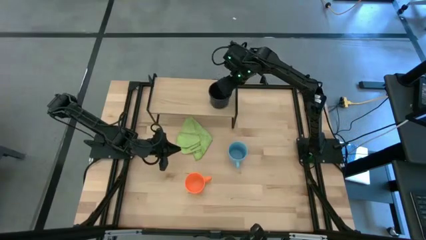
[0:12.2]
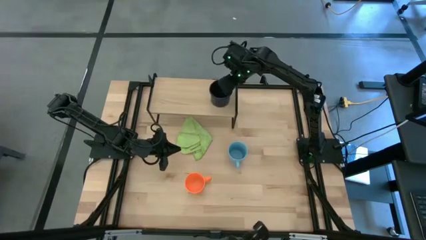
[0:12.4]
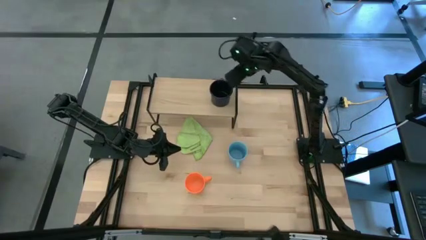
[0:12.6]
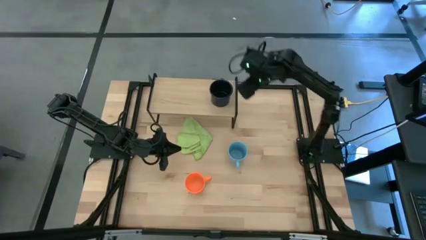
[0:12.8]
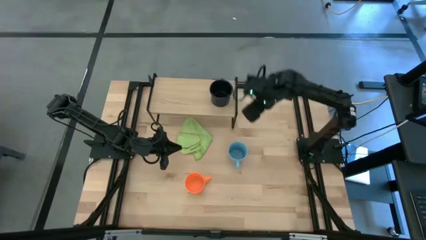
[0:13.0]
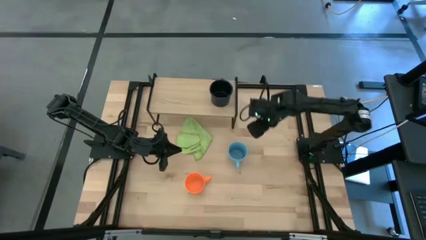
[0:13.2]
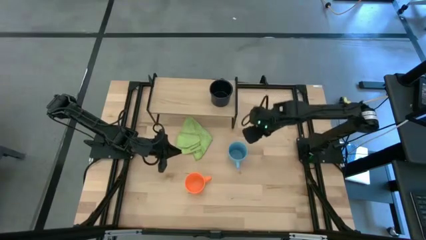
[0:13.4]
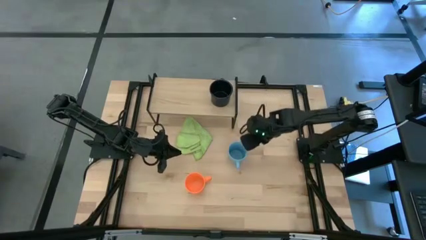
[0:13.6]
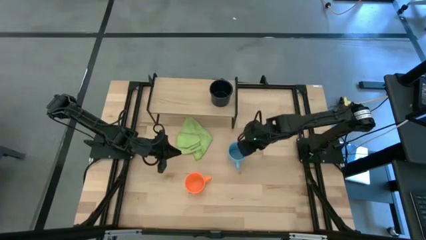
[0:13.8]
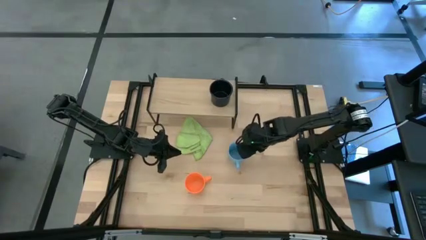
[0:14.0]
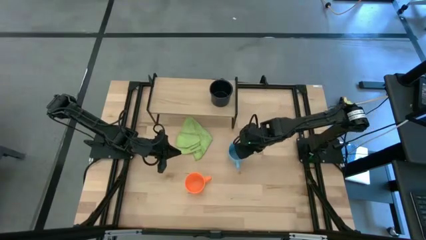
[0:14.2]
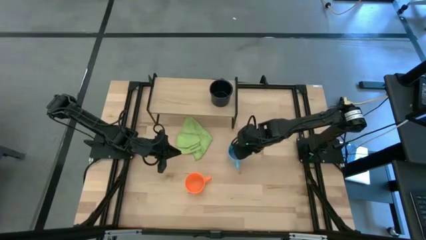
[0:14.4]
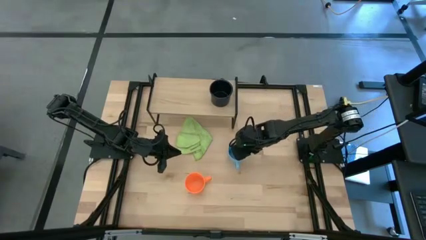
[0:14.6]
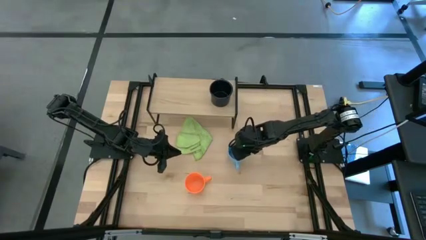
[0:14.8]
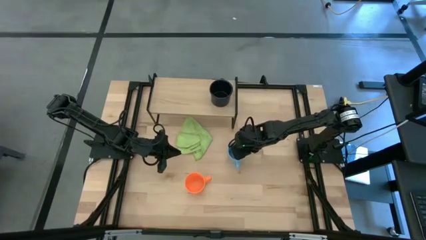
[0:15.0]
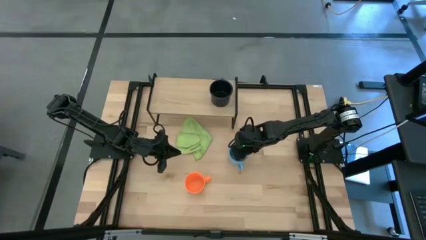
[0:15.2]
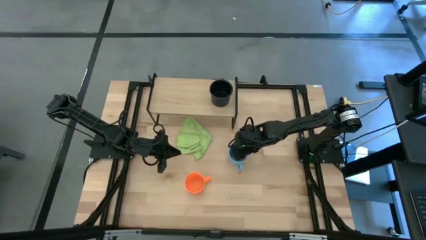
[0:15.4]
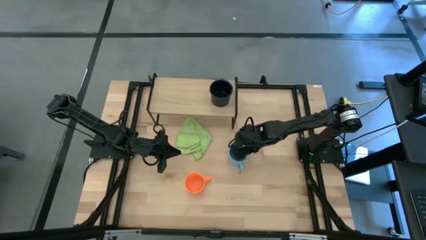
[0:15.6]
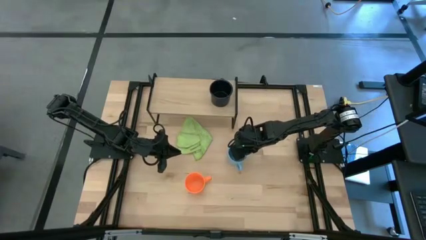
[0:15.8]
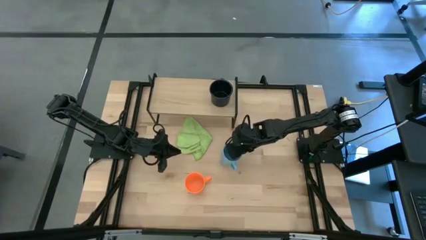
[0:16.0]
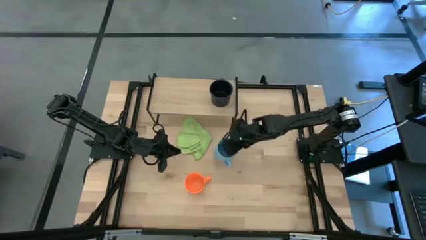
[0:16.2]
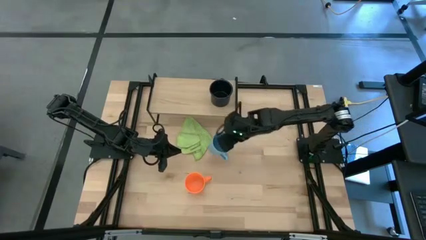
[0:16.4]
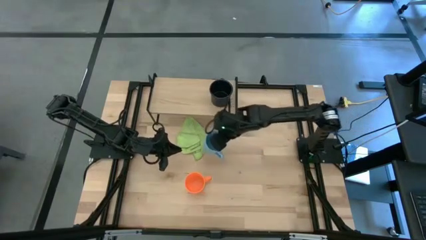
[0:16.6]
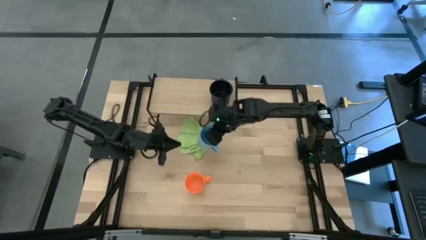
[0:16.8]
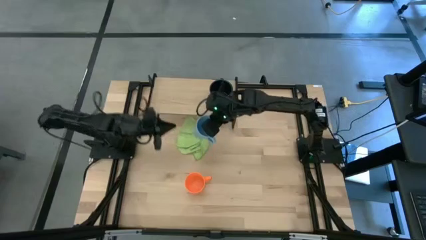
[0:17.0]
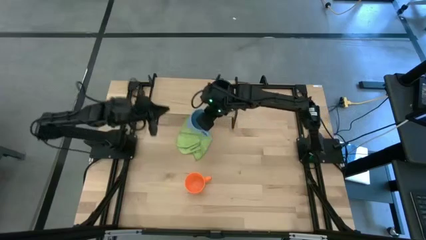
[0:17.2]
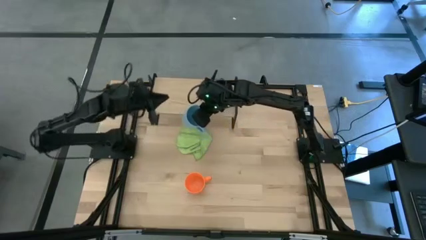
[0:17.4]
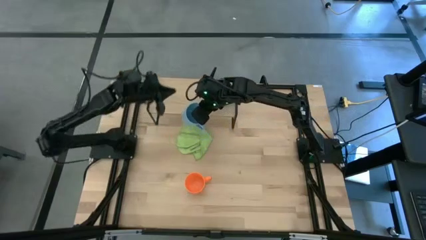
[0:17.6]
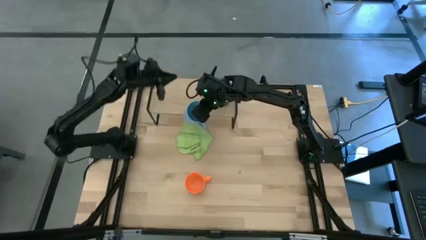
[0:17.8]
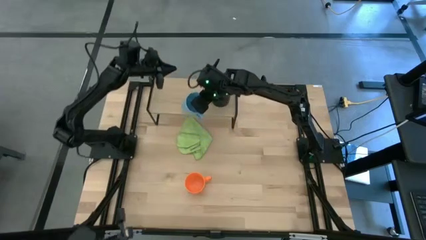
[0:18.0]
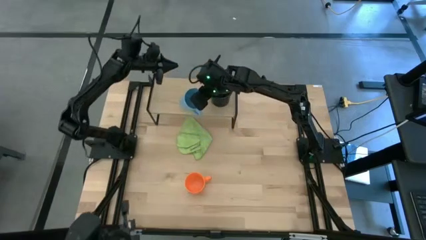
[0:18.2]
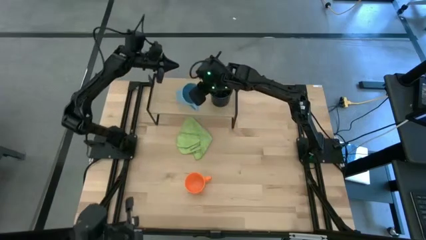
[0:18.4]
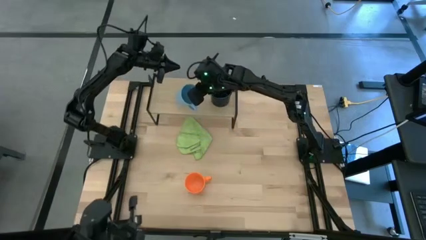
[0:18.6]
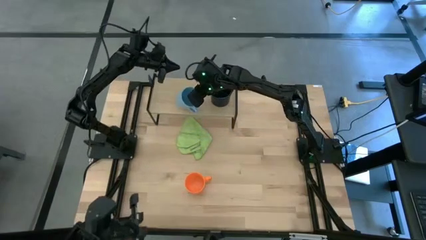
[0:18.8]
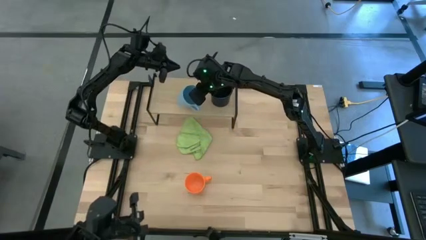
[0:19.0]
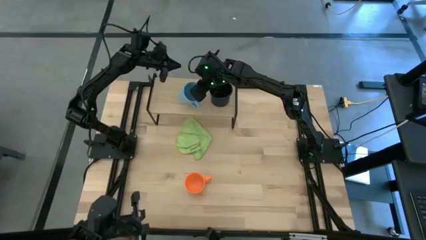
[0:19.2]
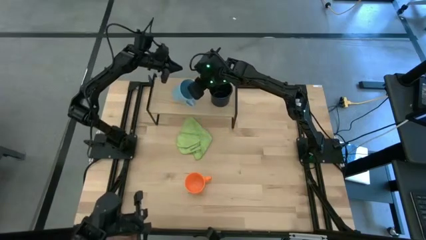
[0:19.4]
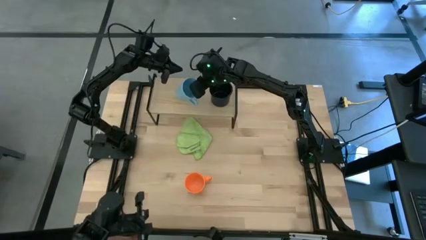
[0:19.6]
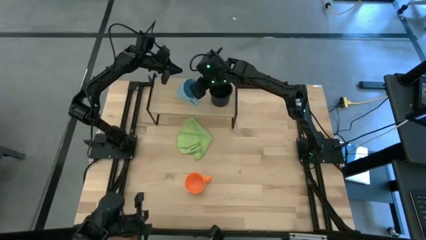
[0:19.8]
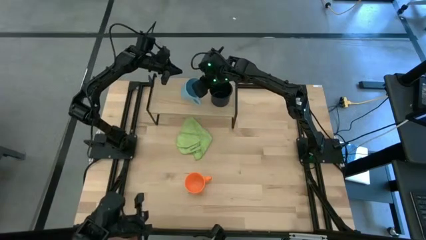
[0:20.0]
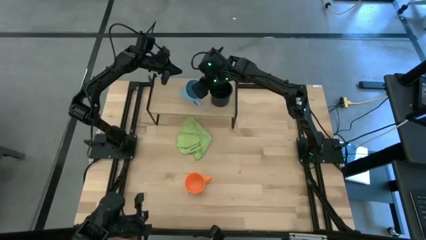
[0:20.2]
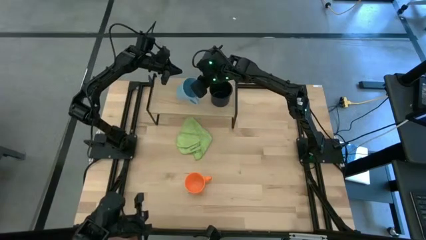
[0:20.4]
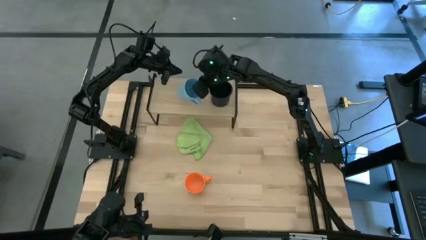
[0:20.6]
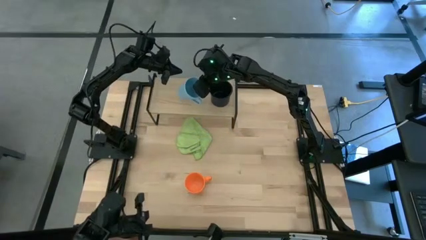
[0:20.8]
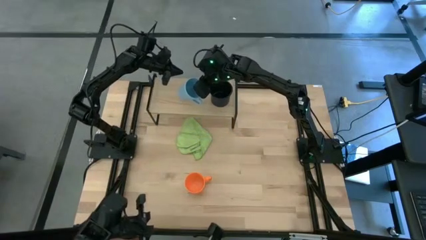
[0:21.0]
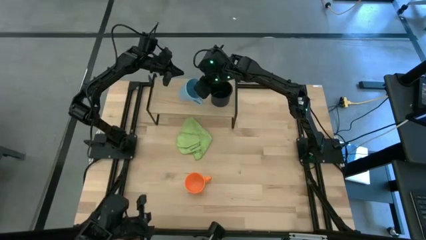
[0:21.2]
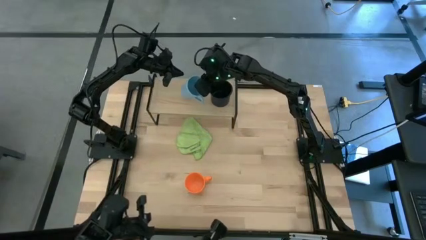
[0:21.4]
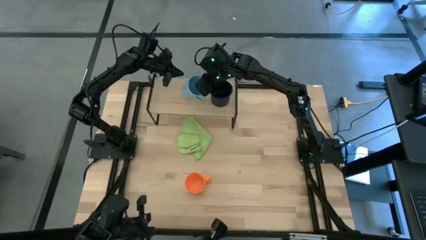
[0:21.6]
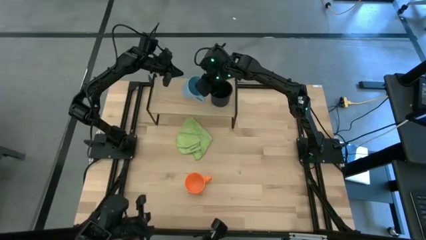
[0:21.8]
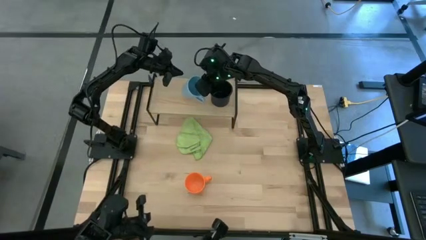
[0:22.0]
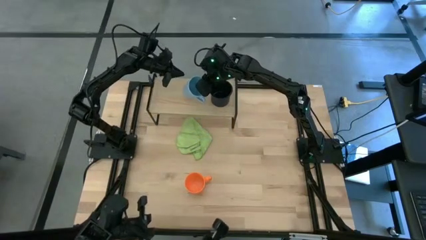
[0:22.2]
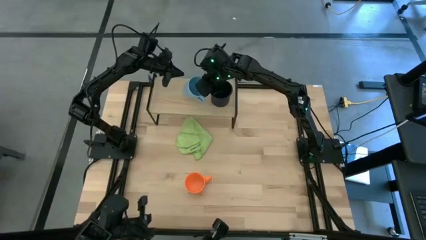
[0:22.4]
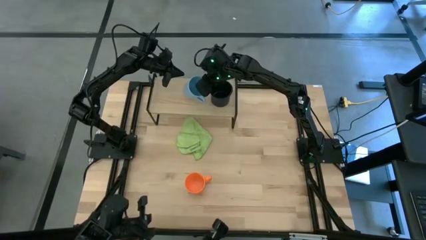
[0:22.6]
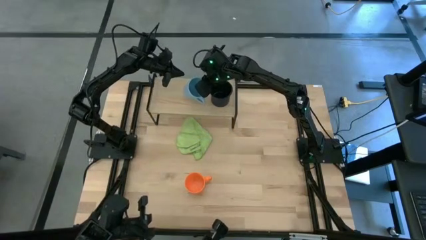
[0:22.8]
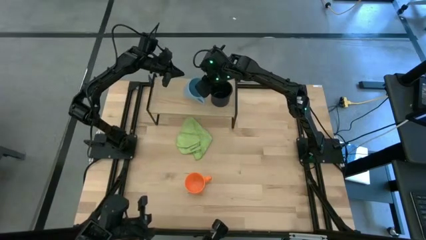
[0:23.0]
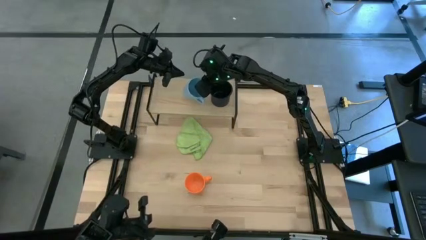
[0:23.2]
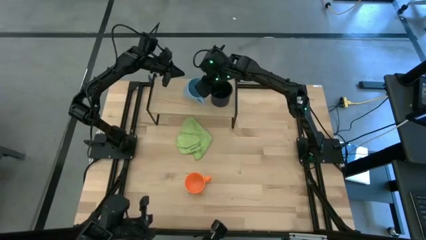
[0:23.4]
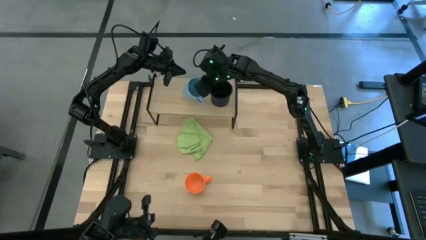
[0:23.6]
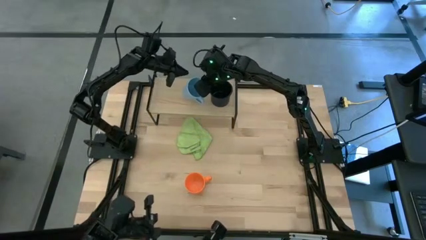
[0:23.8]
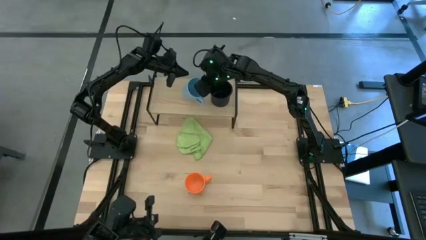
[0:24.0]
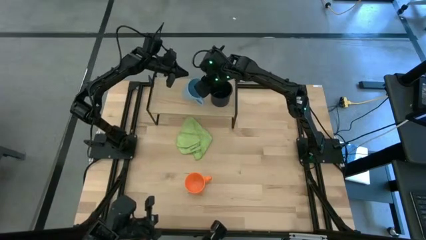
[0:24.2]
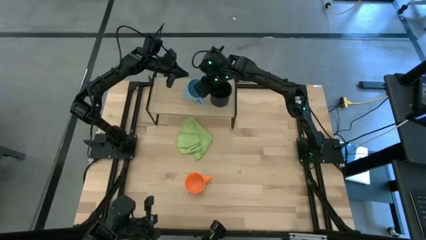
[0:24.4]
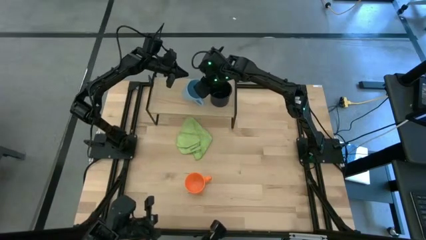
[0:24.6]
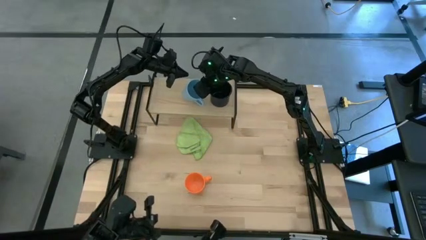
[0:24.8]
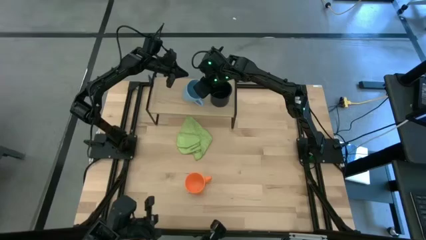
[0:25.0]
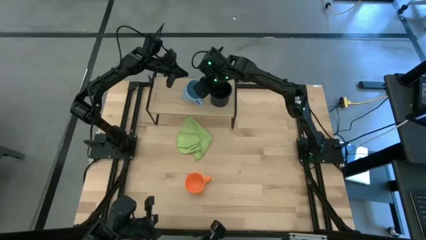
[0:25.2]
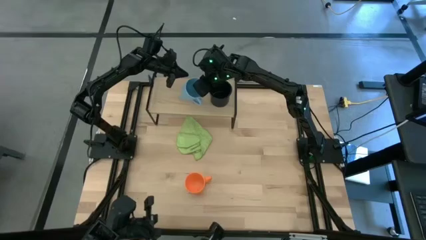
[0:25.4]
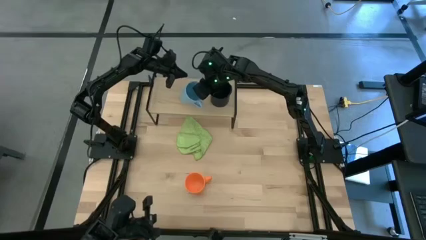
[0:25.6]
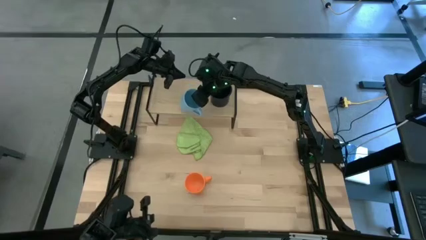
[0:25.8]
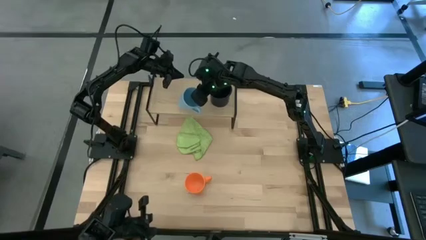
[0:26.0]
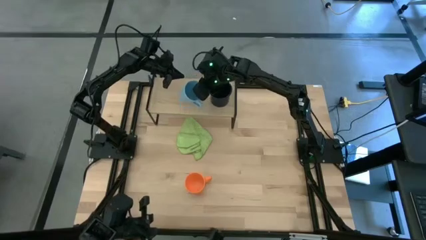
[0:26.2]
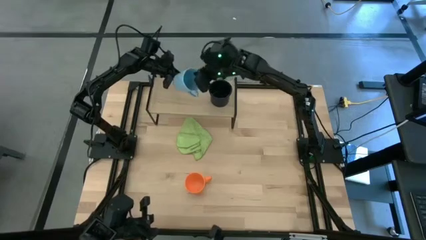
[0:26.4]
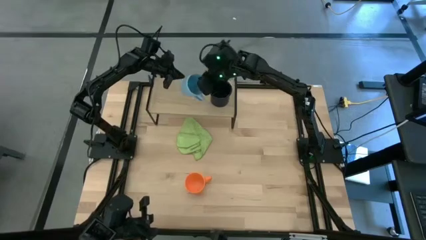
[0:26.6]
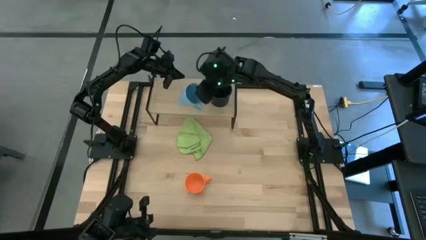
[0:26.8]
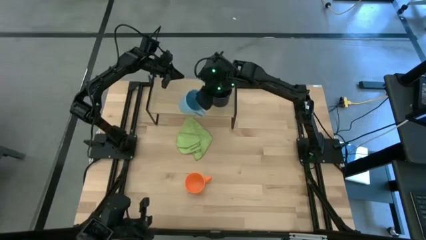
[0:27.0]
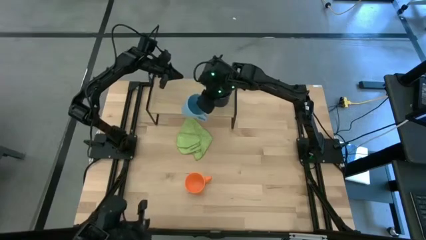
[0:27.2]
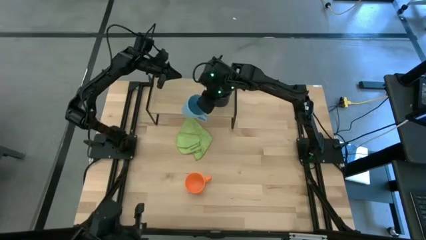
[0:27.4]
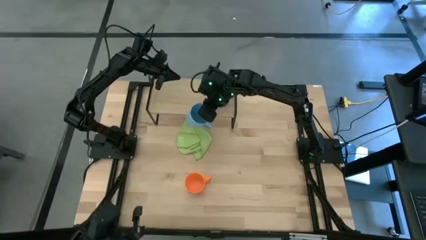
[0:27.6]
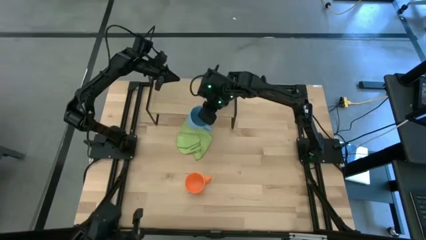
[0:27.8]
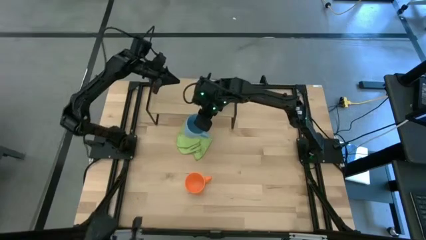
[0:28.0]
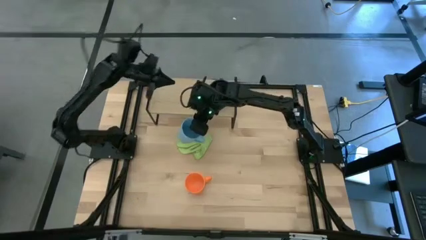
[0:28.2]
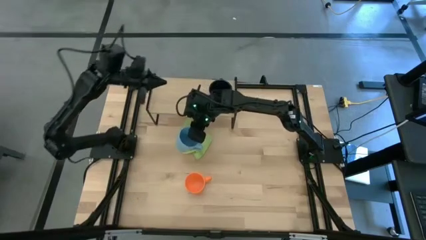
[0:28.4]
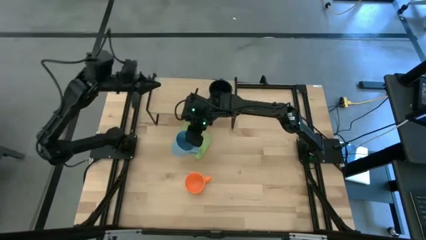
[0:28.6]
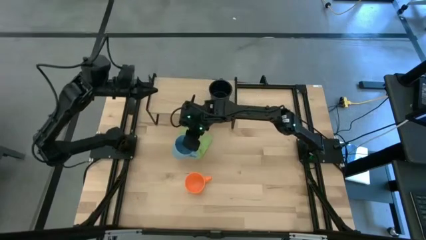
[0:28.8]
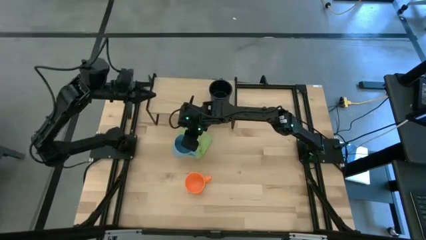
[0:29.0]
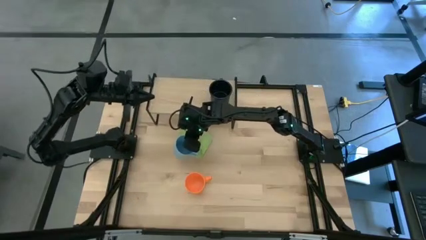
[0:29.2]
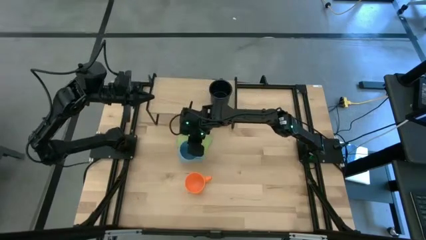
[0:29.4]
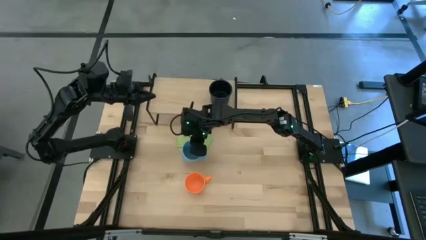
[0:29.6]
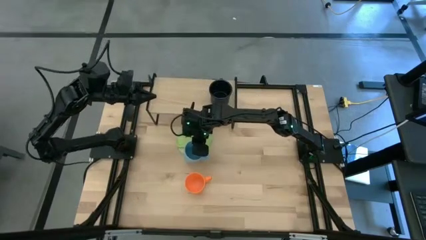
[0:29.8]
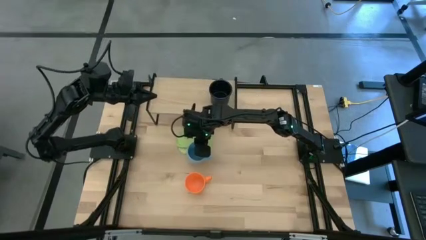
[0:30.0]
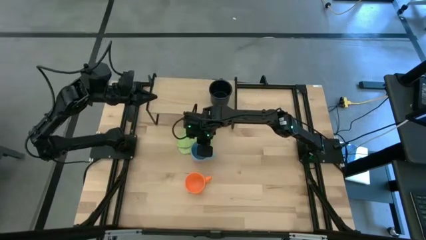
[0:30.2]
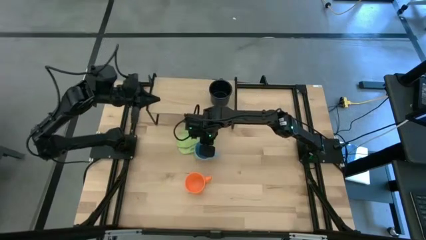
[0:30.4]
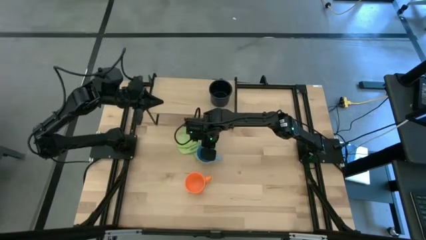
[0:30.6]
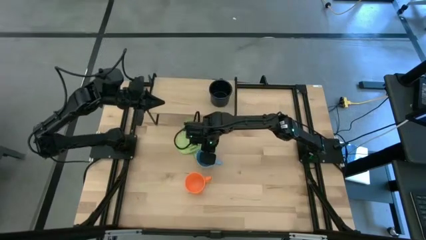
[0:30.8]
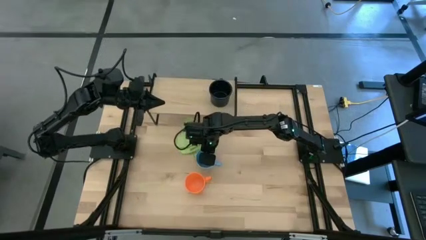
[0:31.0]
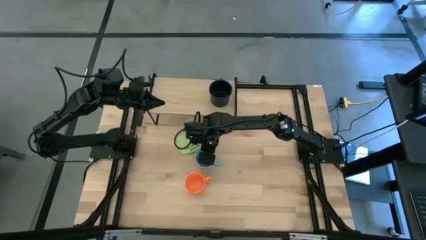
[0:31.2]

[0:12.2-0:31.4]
Task: Stack small to large cups/mugs on shelf
Put the blue mug on the shelf
